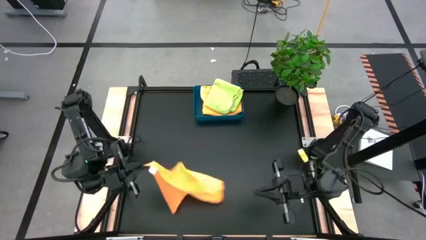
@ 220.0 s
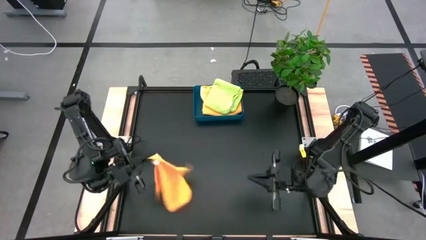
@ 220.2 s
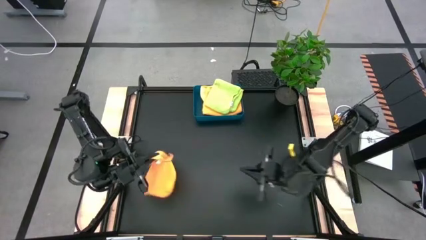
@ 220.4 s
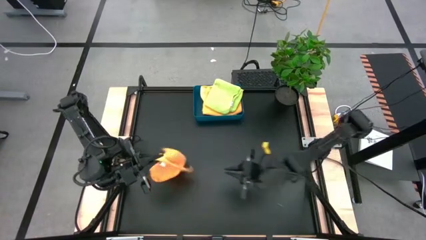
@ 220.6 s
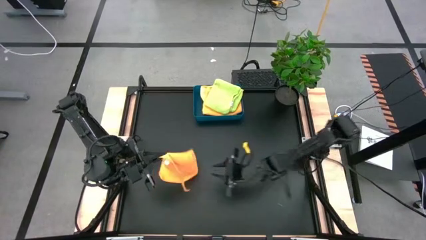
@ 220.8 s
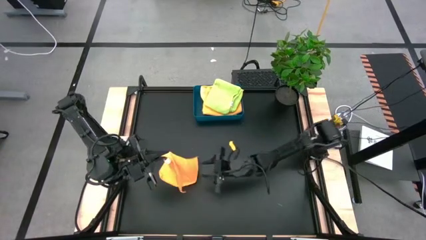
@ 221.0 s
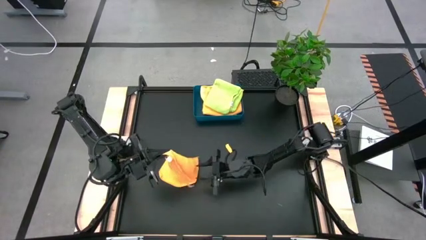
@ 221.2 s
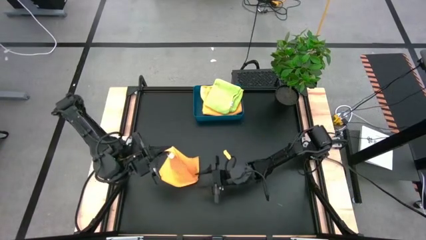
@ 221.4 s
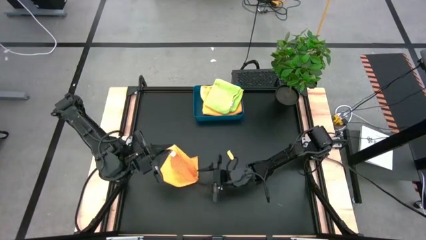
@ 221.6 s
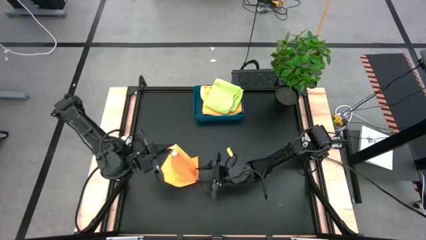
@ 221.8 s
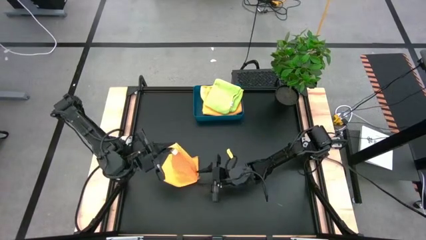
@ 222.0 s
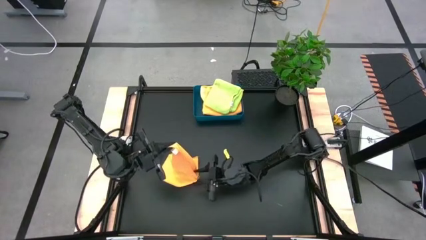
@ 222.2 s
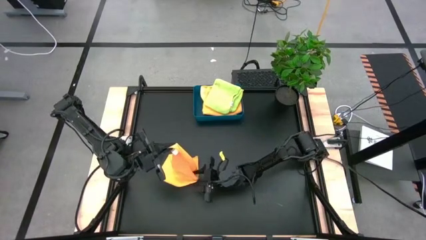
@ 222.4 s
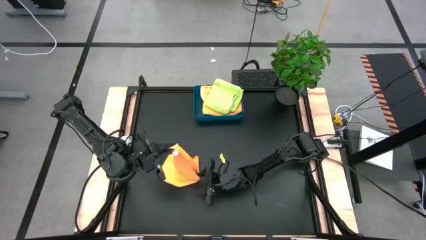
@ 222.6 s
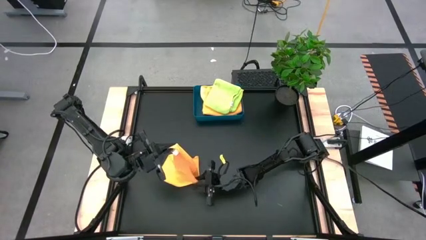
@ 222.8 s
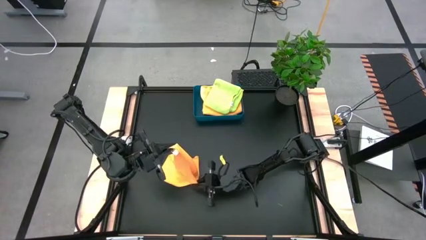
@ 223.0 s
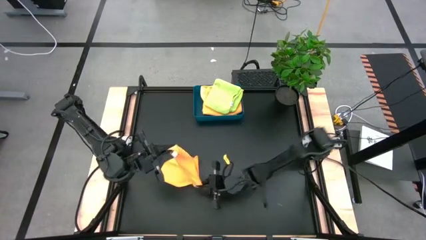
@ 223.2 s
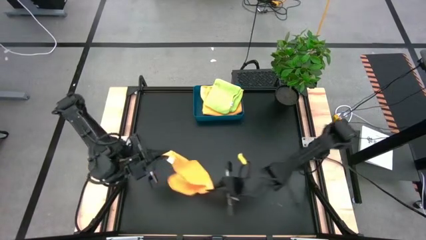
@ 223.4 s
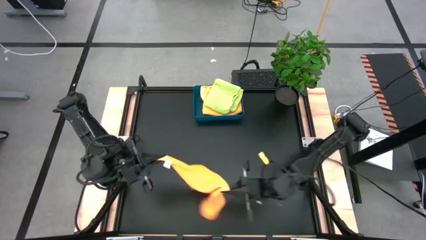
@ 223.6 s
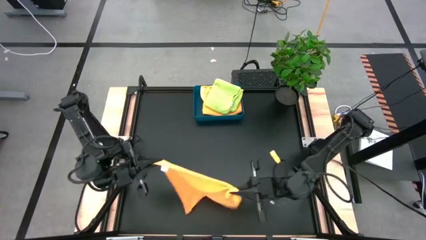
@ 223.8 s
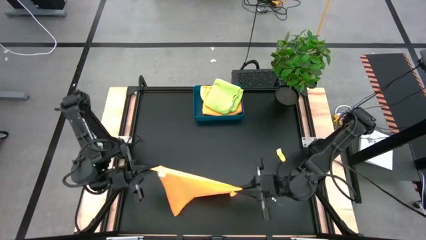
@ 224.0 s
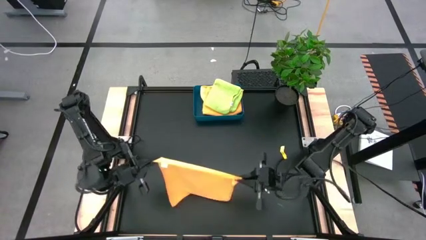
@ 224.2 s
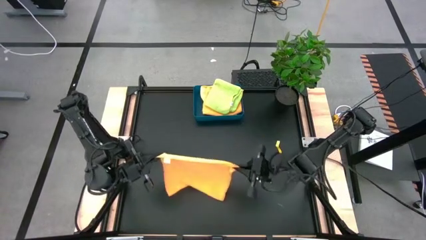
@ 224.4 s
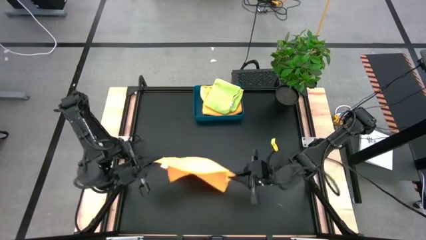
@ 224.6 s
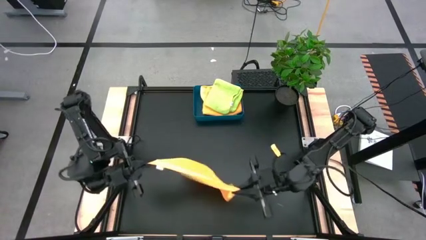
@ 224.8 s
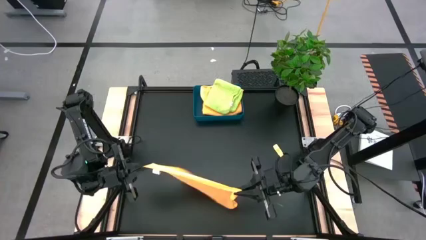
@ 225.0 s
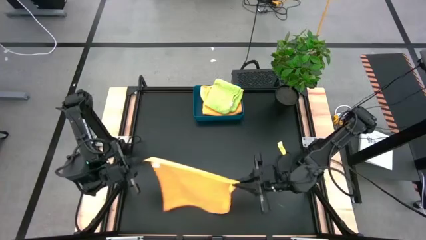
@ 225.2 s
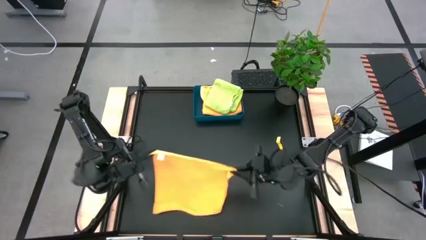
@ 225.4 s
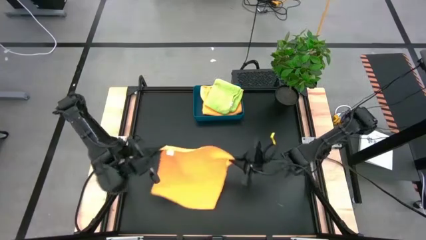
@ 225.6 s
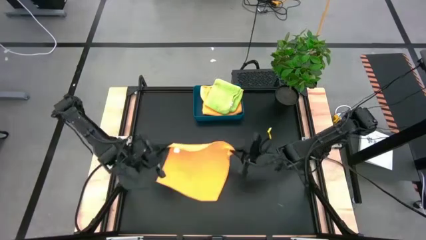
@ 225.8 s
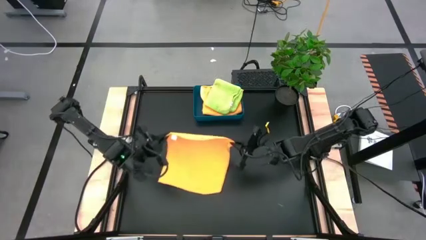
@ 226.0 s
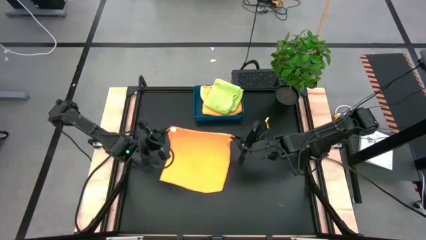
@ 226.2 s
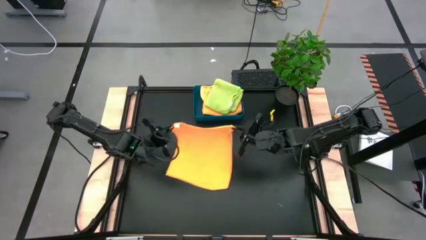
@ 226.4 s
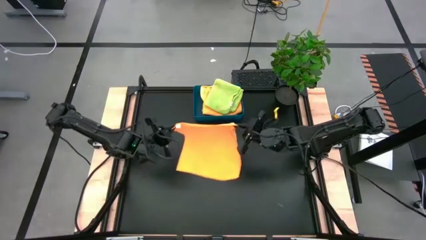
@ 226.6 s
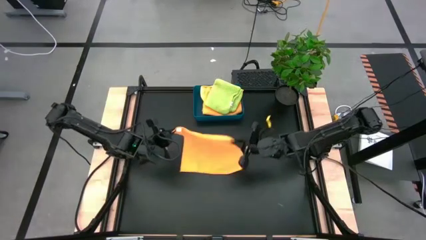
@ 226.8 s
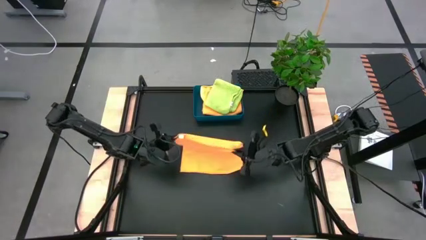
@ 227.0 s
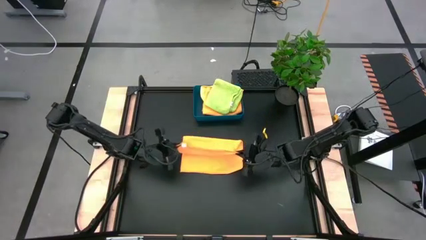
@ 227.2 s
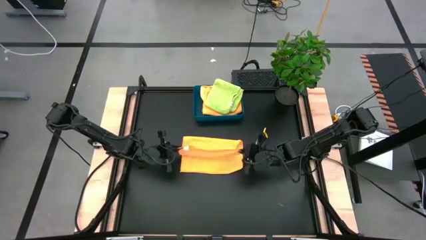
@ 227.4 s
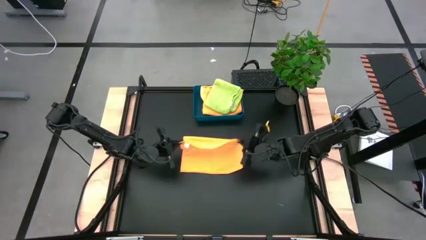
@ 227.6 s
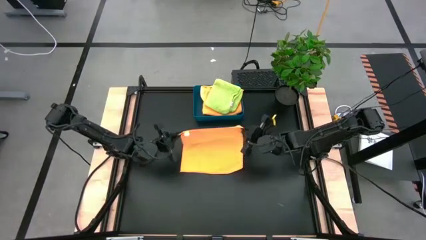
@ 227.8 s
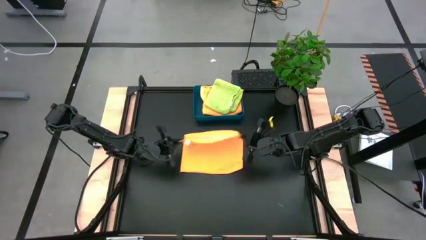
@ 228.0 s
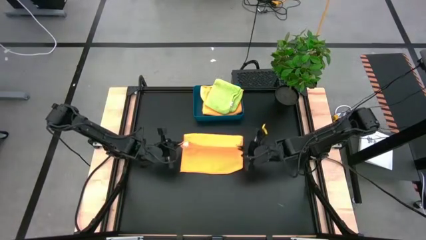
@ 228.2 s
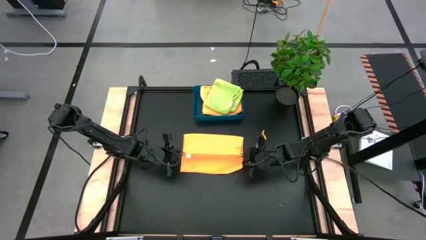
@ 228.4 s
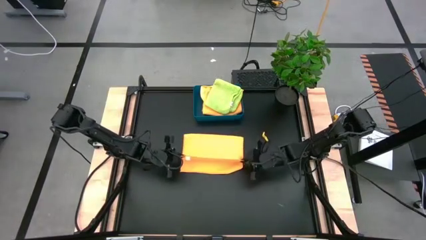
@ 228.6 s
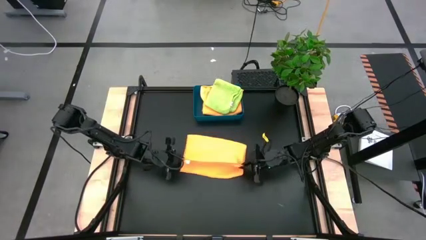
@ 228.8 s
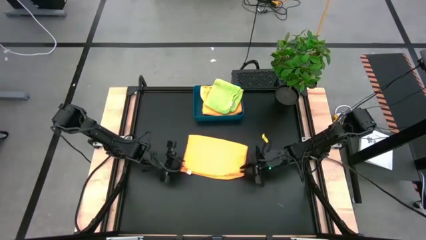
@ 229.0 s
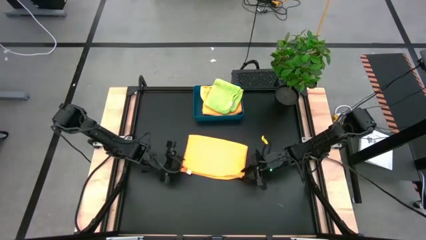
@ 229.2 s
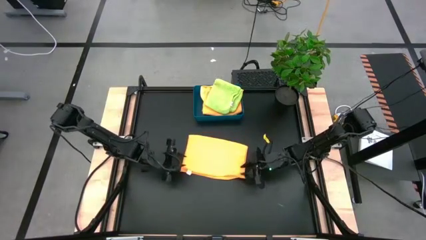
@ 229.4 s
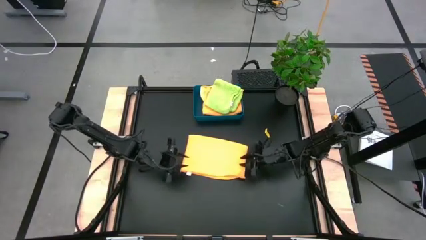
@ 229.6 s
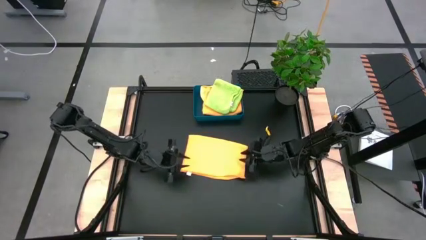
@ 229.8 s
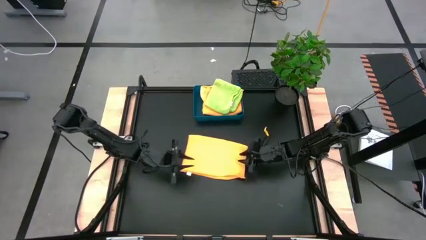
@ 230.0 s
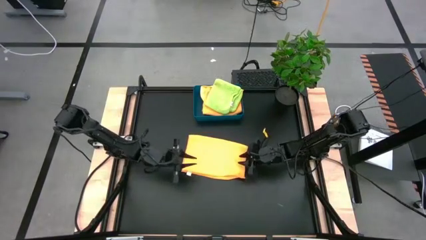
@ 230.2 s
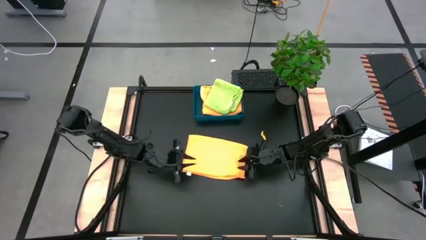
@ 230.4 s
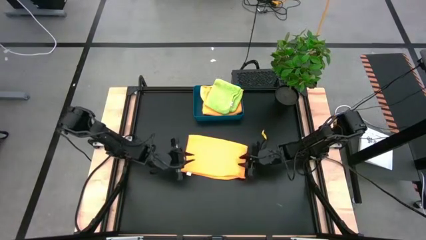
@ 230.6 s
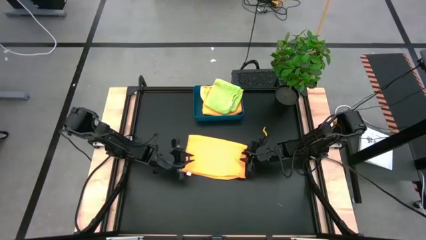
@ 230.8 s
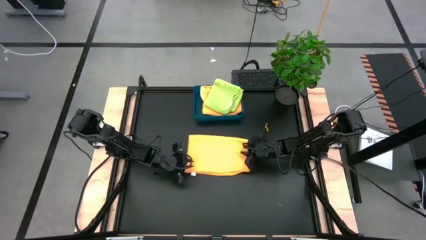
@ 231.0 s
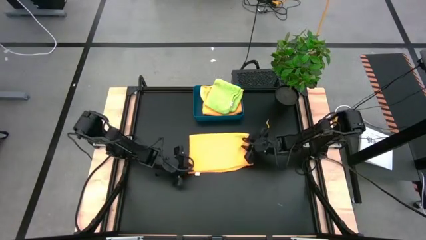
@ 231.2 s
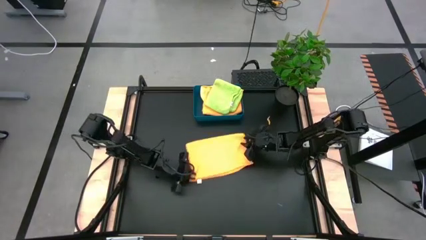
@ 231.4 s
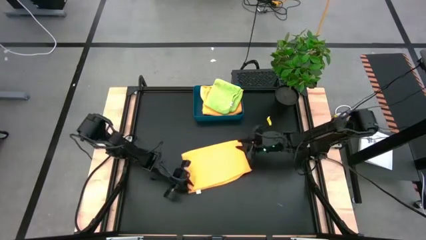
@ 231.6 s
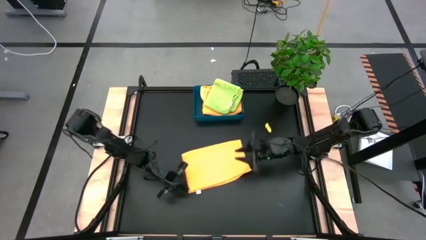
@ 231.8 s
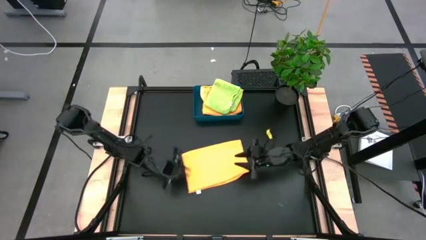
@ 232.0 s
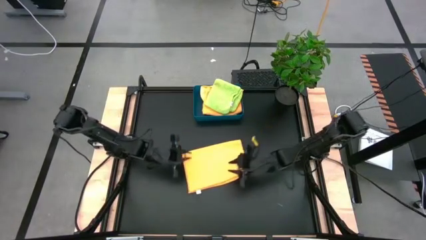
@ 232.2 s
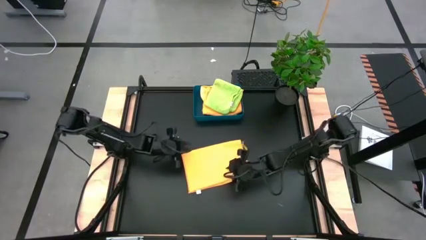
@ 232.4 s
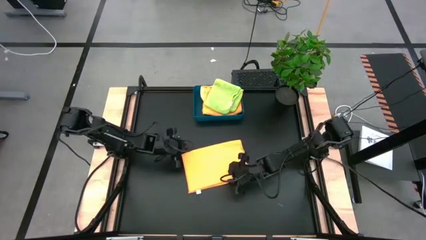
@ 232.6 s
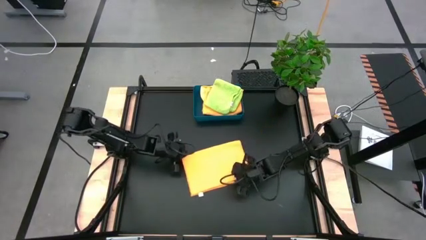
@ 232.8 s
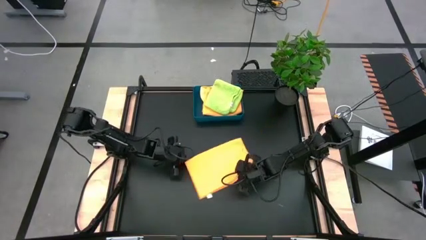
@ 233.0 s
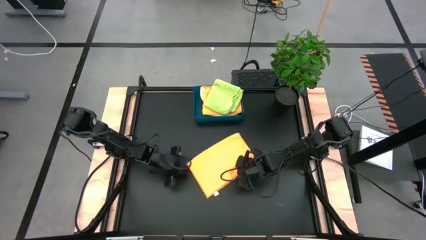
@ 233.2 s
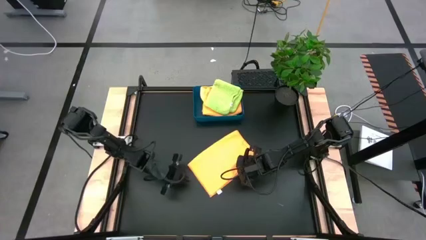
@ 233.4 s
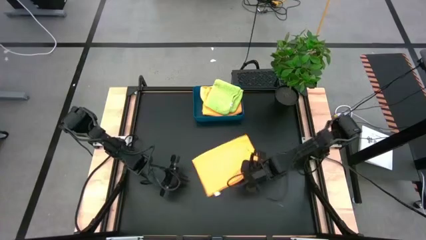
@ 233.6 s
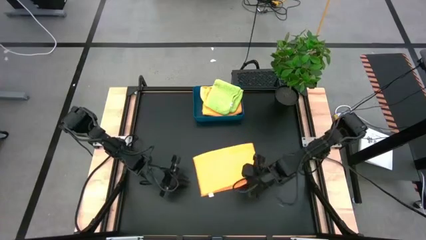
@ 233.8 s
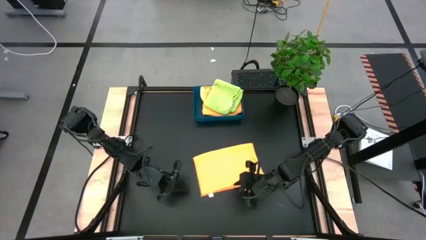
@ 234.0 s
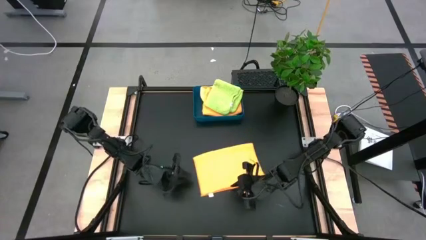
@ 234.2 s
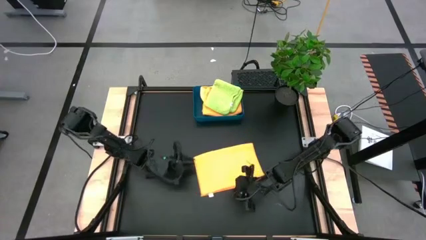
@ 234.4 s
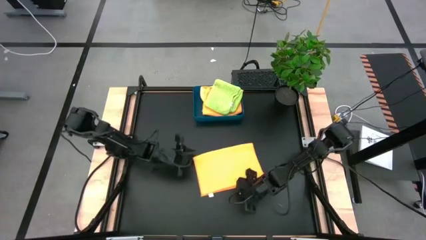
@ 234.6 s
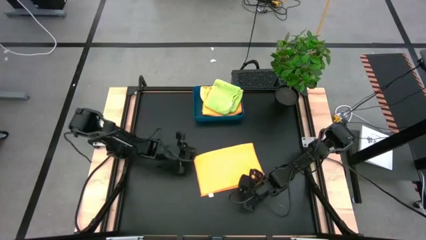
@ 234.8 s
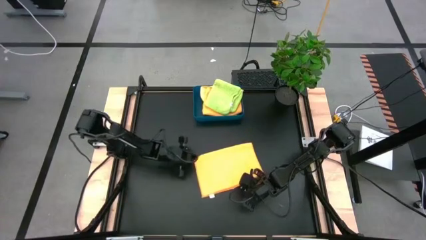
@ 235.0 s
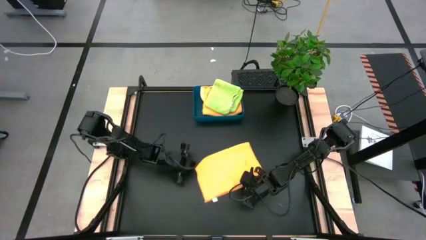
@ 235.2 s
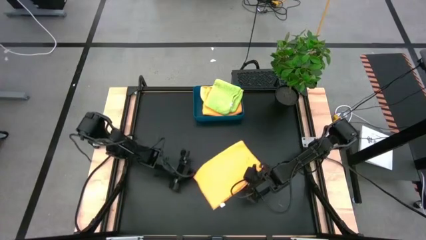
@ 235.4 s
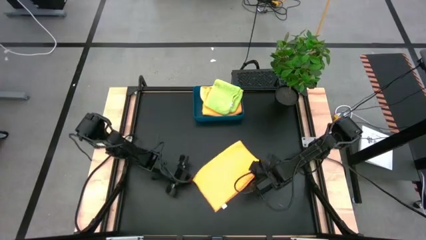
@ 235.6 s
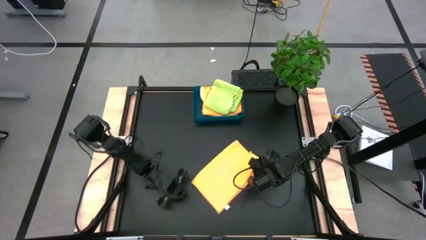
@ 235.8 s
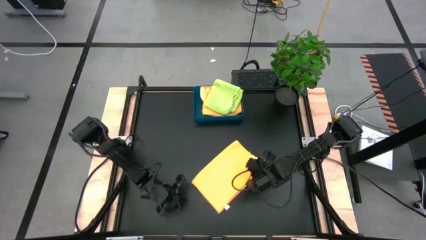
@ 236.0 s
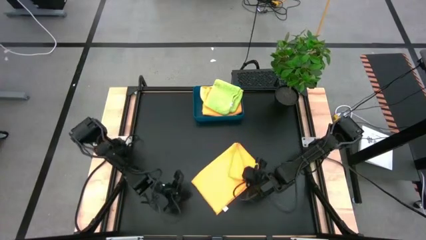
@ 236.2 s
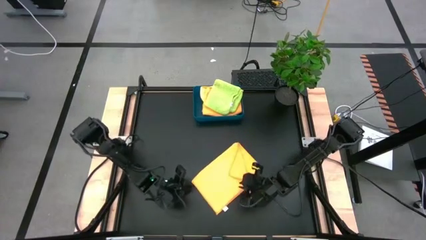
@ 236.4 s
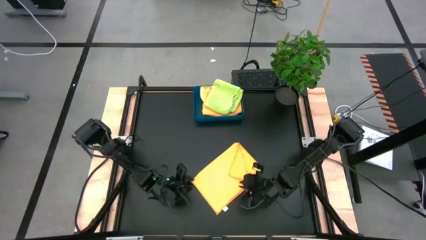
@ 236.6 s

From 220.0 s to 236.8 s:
Task: Fold microfiber towels
Fold the orange microfiber cloth
